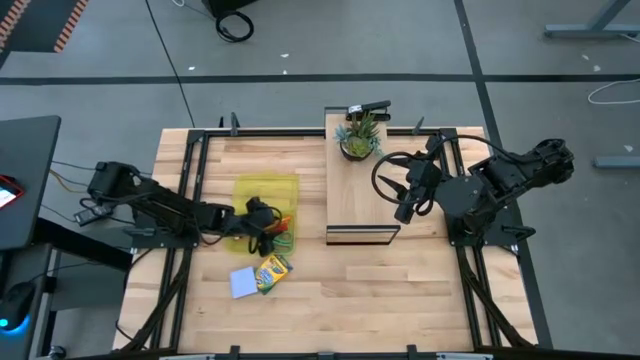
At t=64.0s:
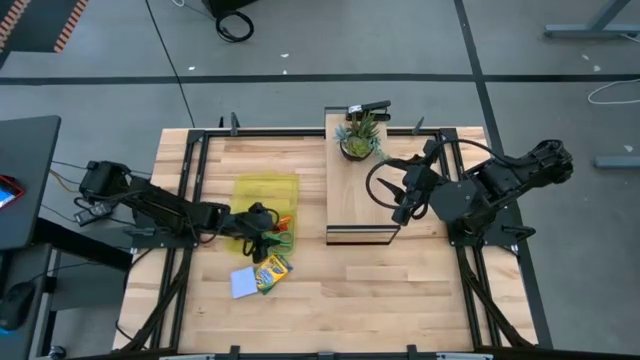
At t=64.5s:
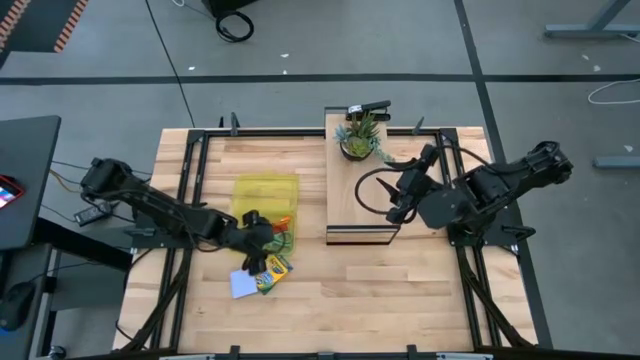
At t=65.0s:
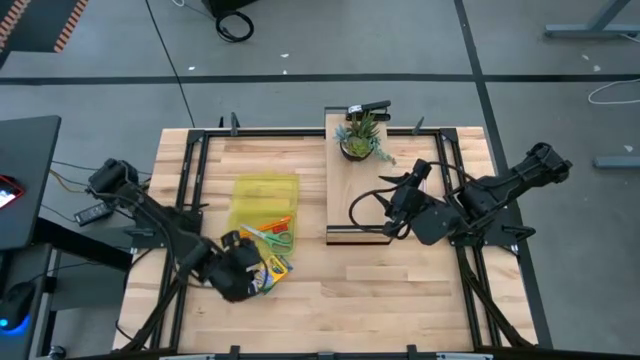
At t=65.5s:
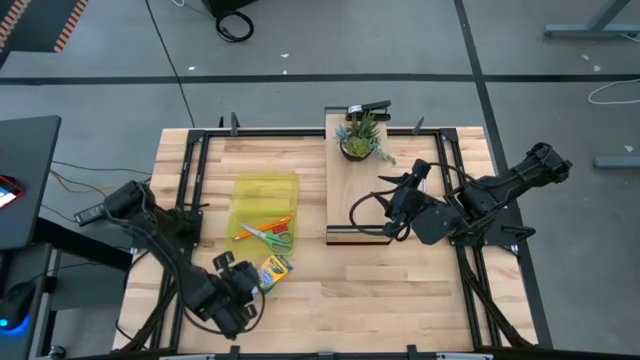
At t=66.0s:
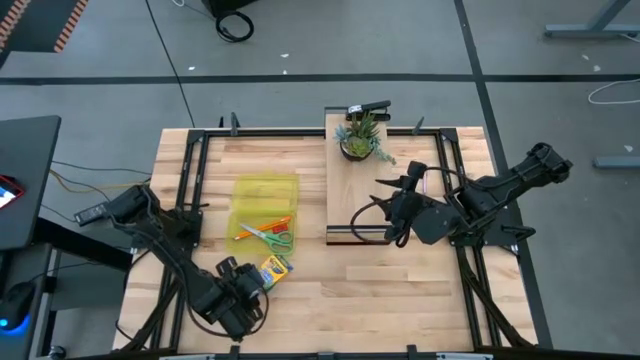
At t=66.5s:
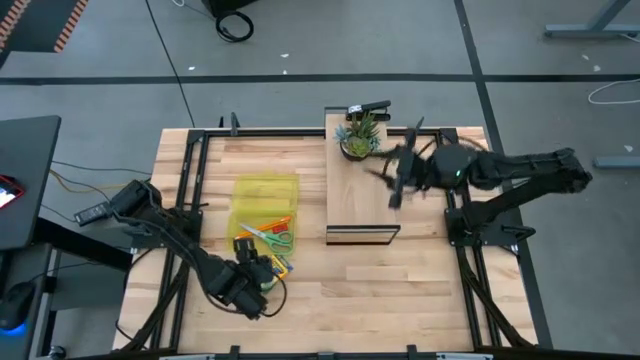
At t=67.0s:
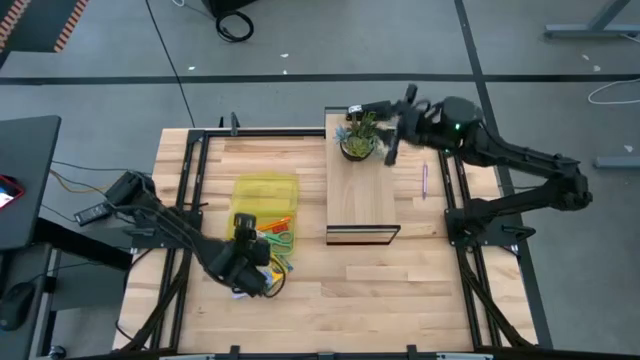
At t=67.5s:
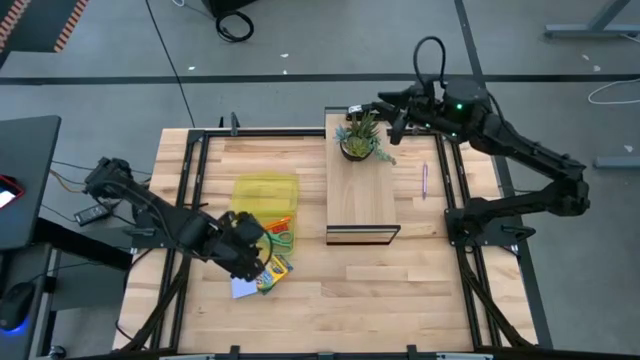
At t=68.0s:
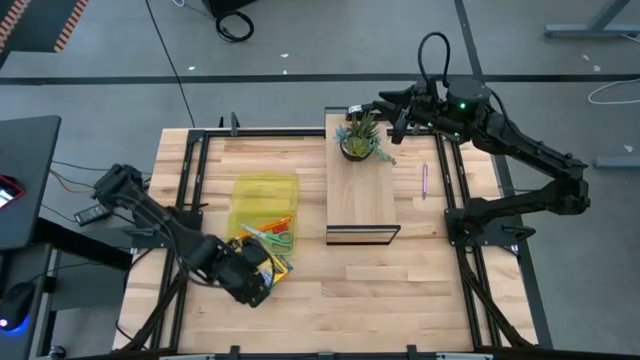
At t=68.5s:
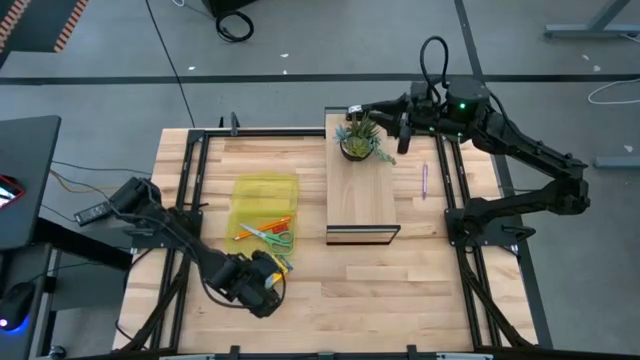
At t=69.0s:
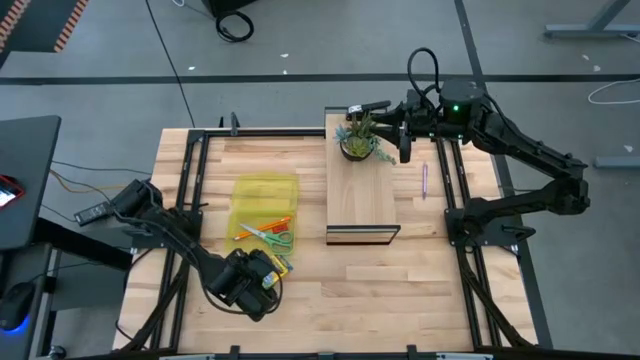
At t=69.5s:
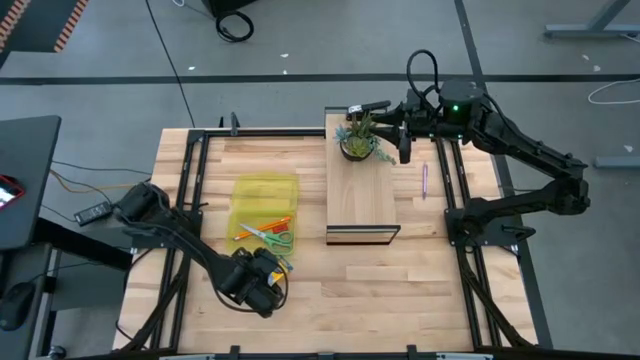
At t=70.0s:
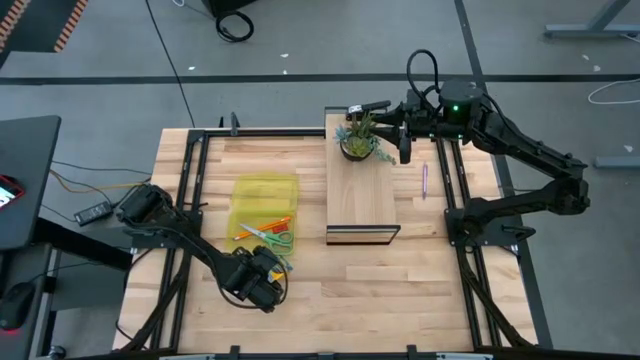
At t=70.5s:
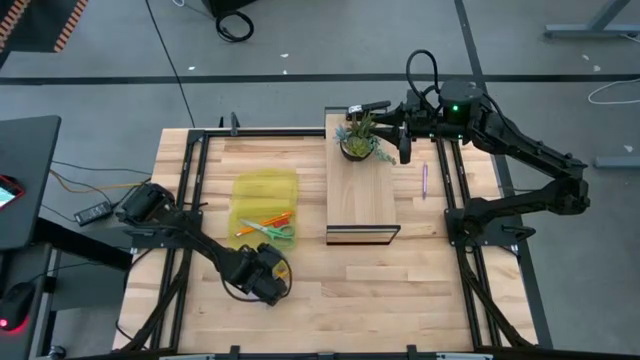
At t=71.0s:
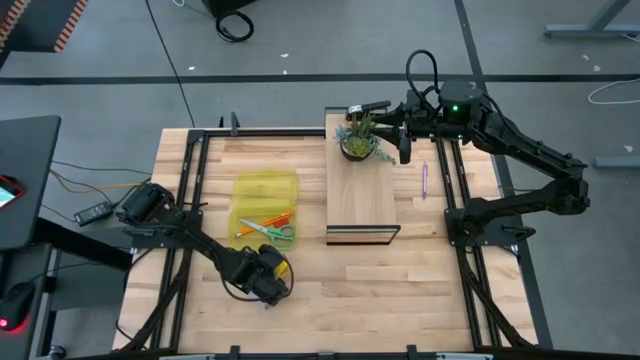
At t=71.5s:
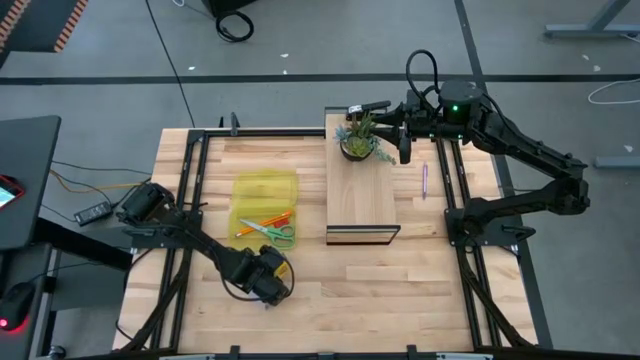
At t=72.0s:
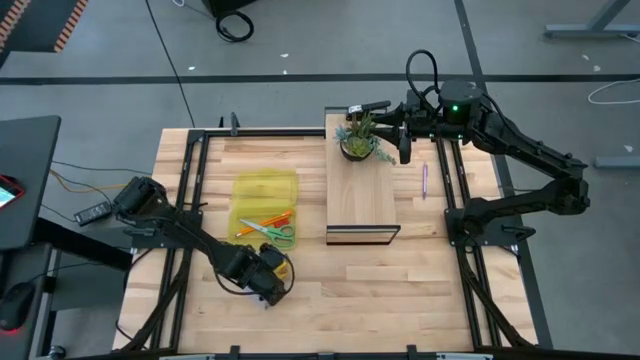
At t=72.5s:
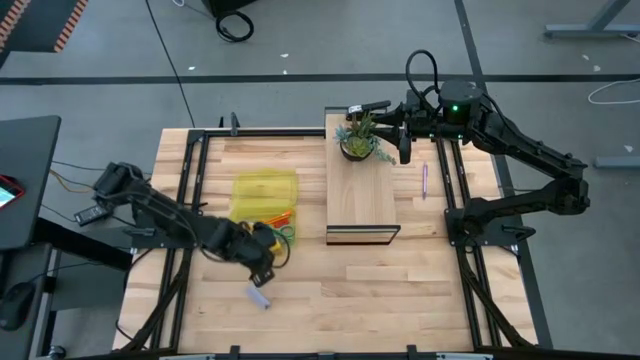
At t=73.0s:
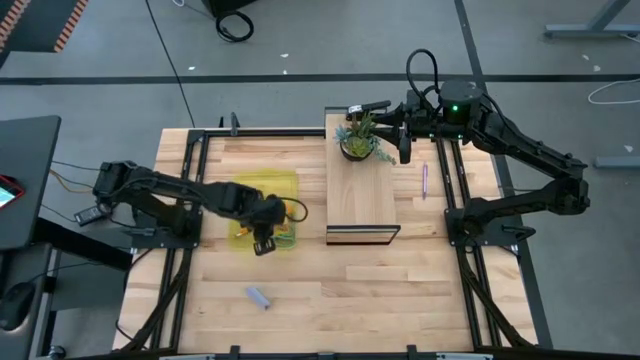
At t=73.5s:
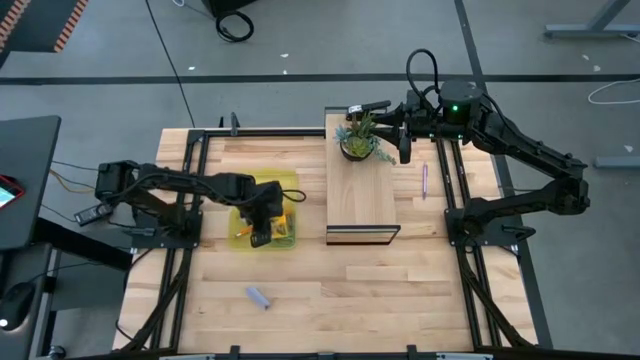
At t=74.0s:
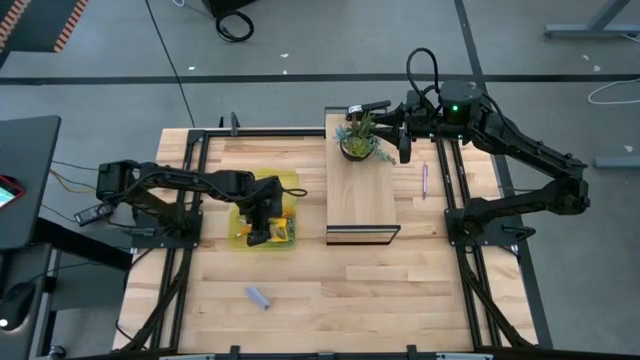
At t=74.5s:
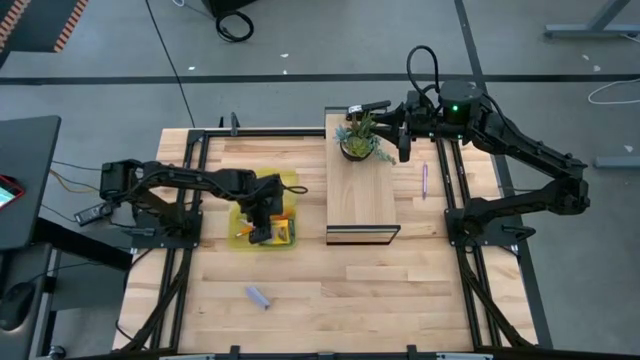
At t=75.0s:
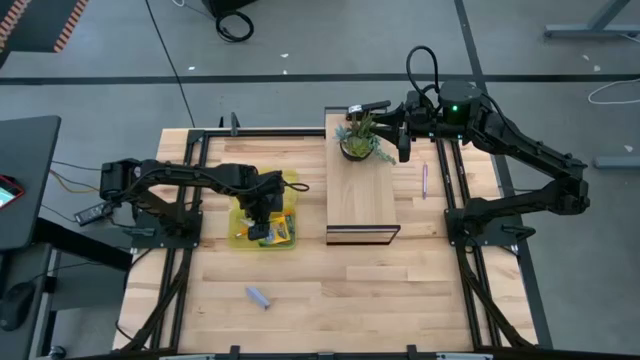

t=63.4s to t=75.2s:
Task: Pack school essentials
Put the yellow crayon box into the yellow supply box

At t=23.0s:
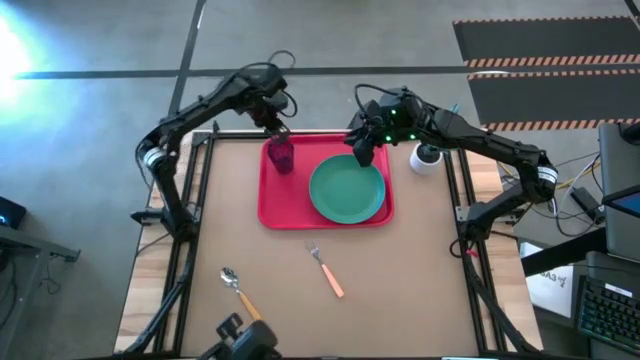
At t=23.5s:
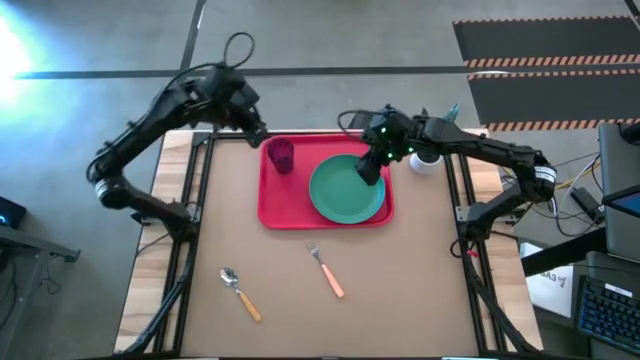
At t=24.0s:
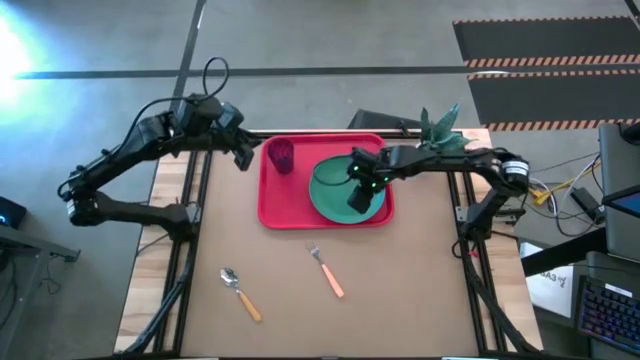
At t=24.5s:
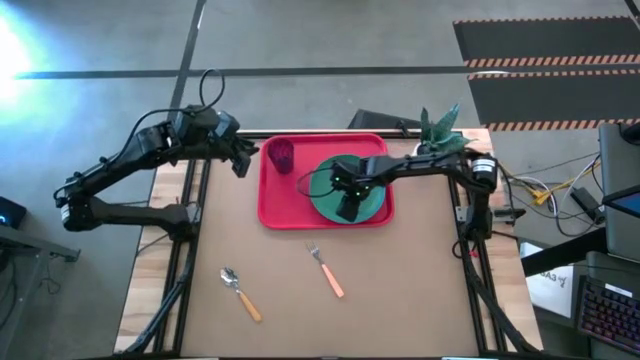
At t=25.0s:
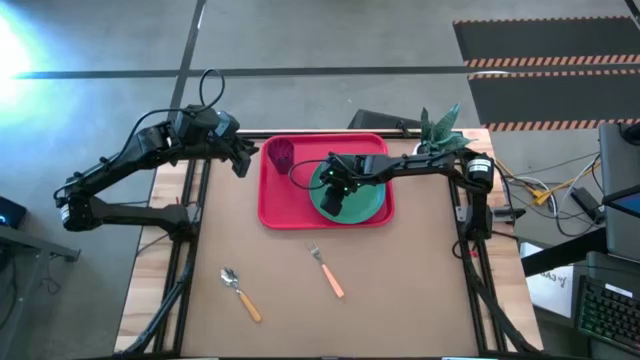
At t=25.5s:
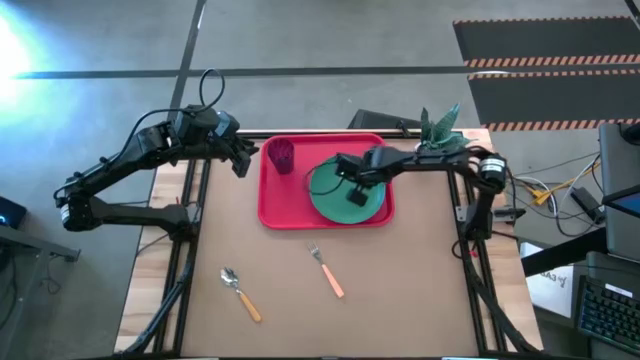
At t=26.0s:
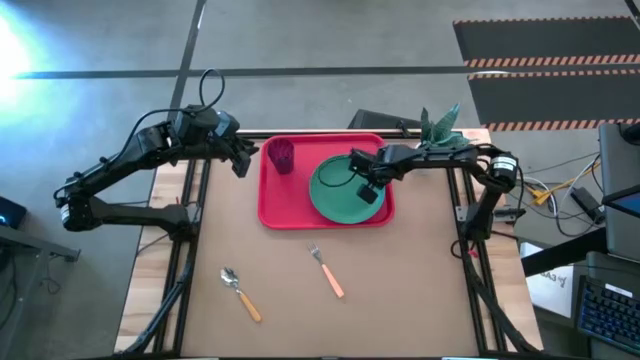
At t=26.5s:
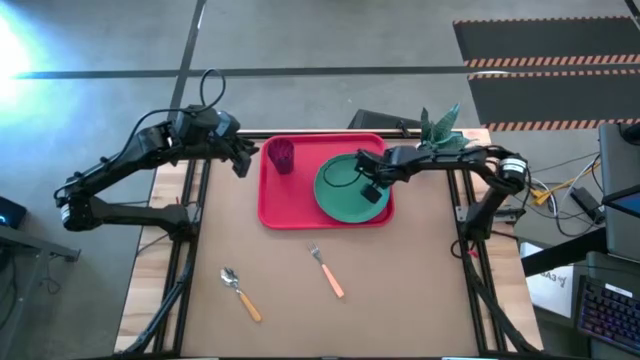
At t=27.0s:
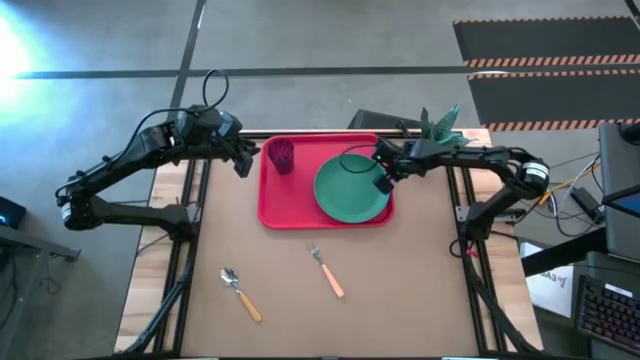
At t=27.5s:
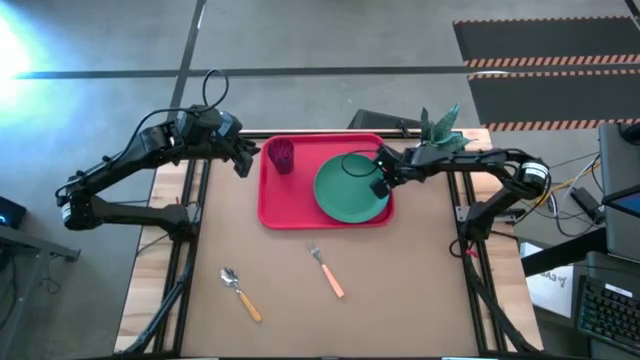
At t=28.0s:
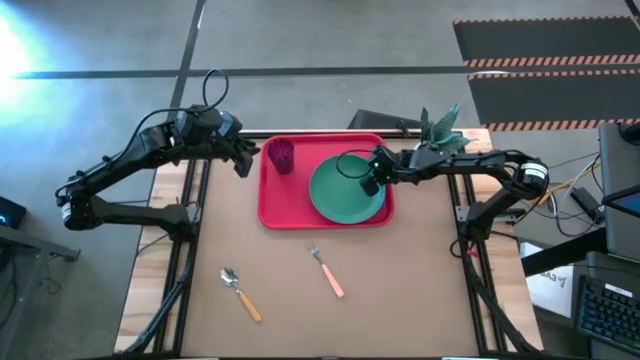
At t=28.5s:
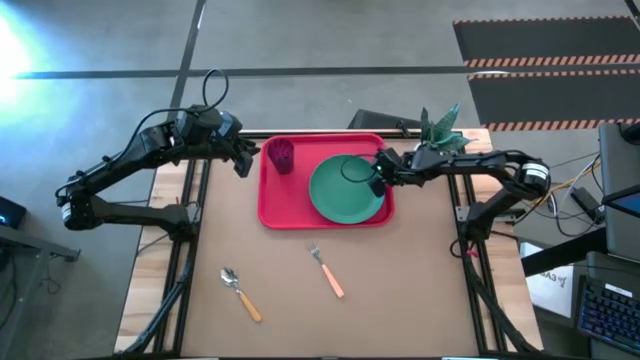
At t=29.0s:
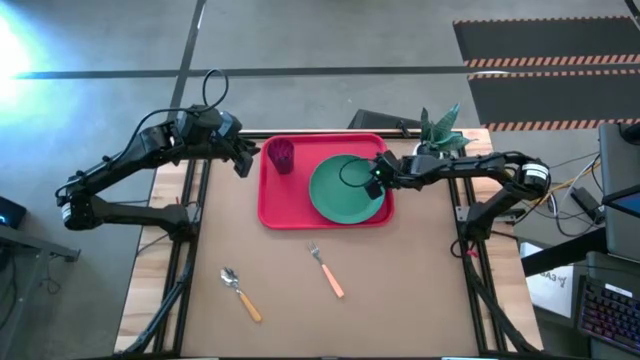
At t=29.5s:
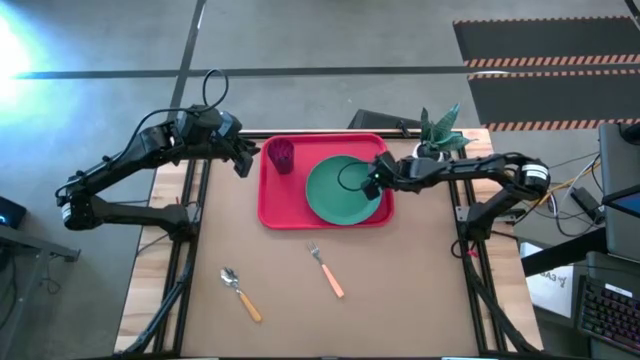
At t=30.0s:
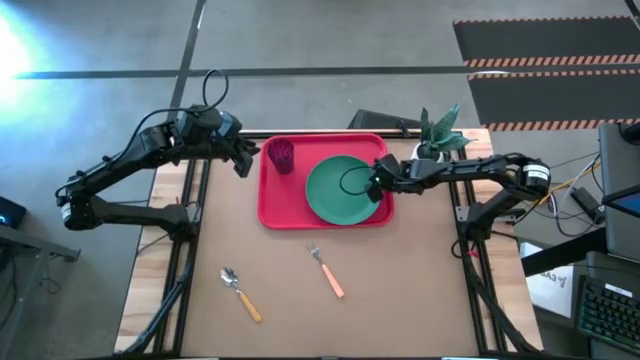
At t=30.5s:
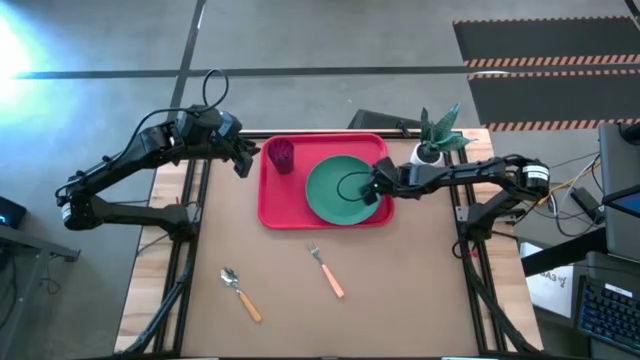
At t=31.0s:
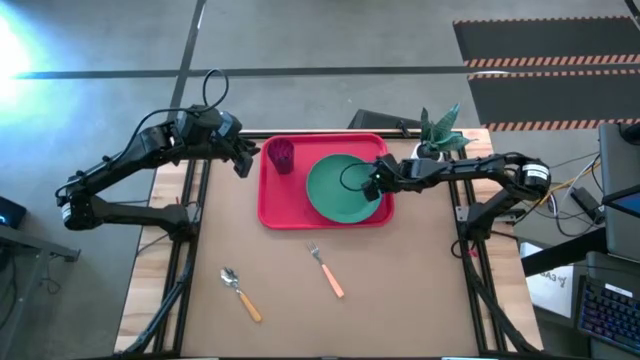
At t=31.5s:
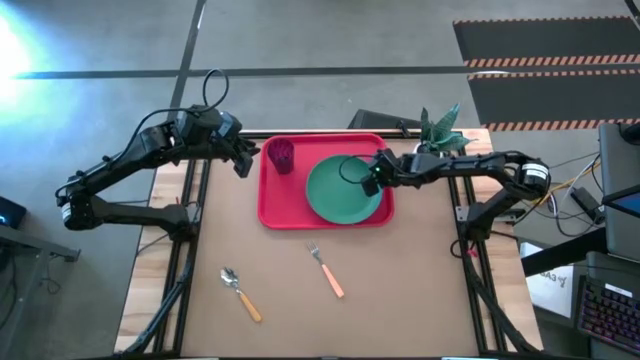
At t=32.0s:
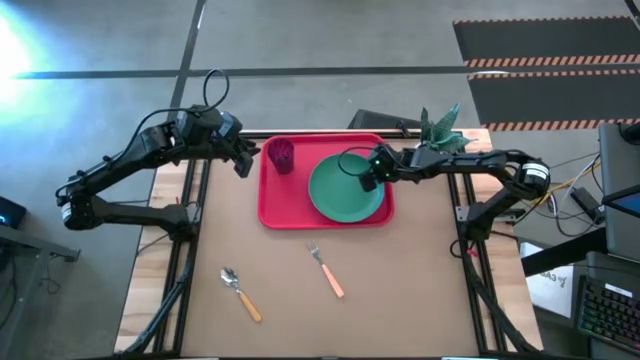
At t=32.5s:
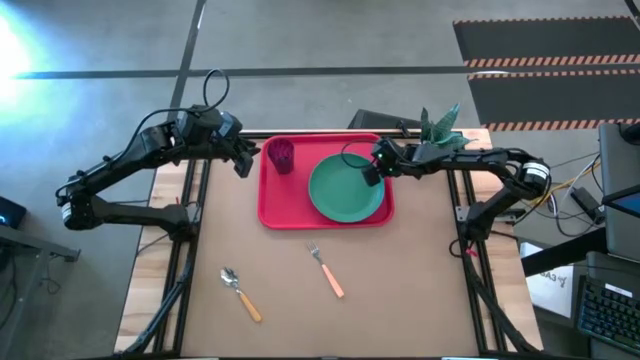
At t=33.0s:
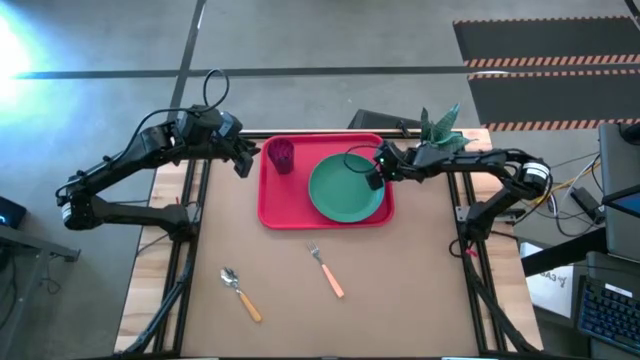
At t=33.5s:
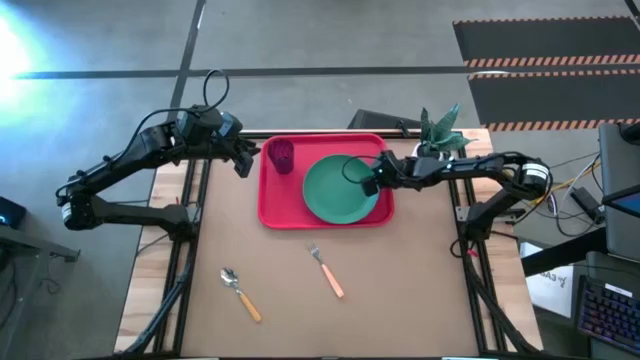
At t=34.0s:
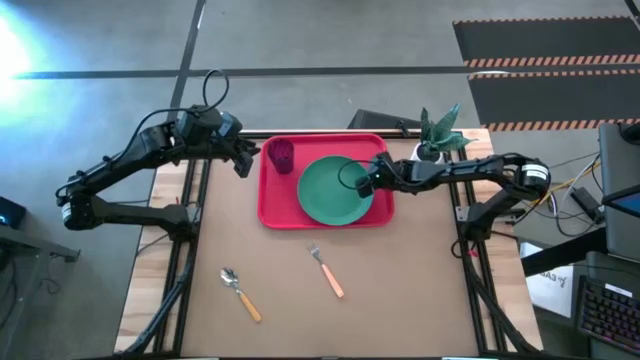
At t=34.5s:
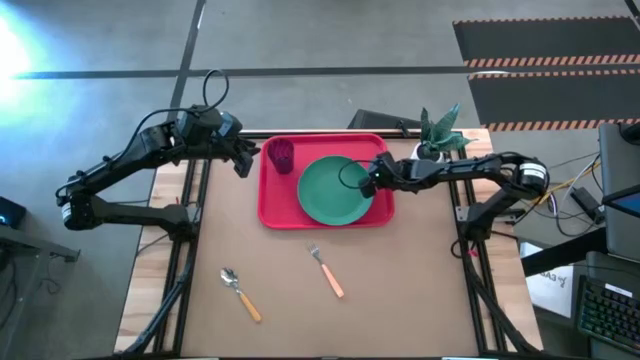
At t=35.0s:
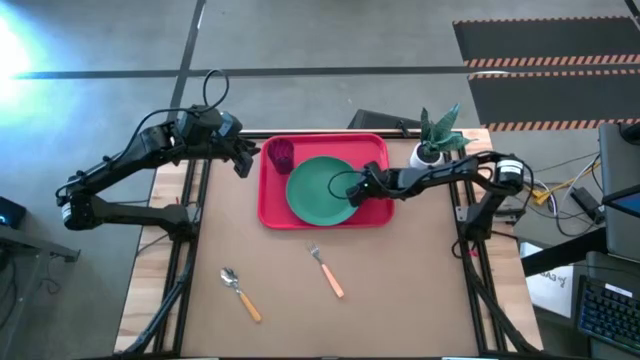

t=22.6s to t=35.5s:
Task: Pick and place plate/cup/fork/spoon on tray
Adjust the green plate on the orange tray
